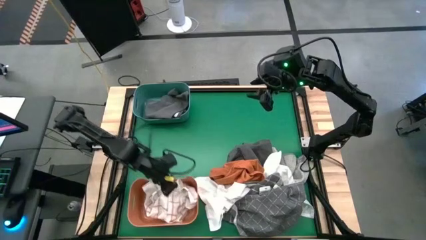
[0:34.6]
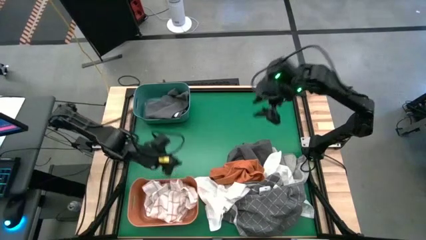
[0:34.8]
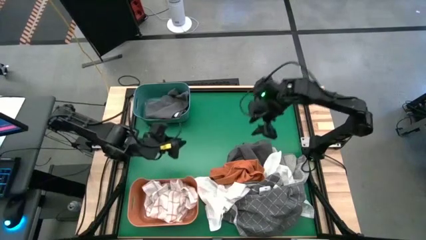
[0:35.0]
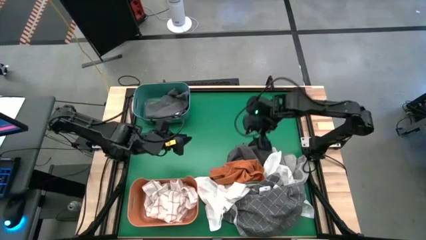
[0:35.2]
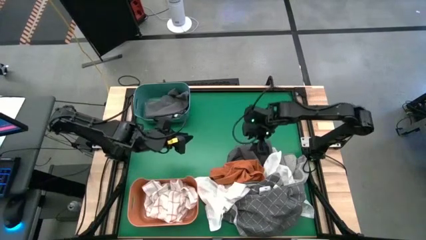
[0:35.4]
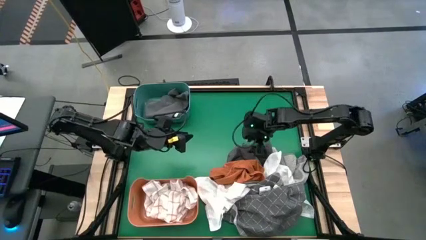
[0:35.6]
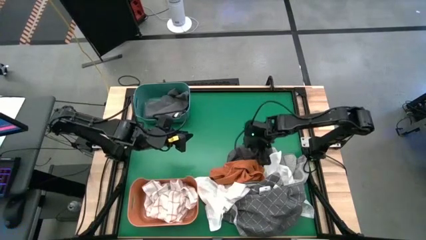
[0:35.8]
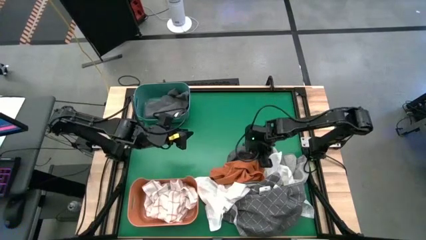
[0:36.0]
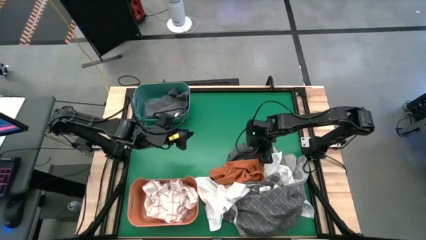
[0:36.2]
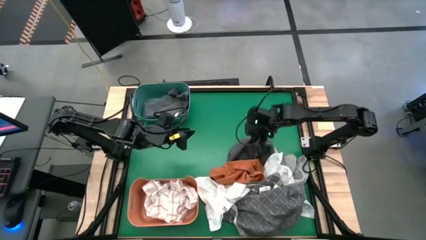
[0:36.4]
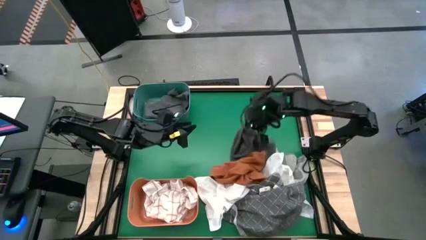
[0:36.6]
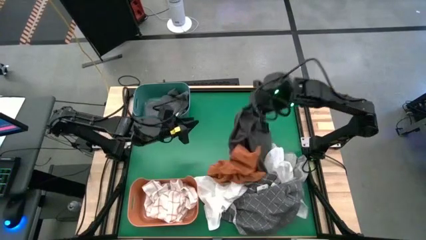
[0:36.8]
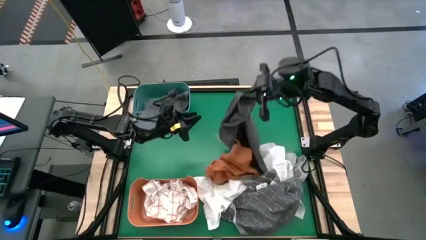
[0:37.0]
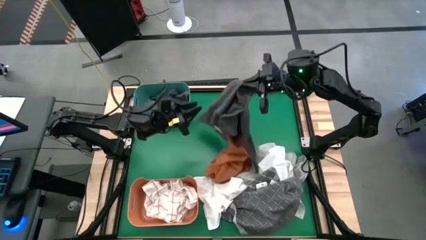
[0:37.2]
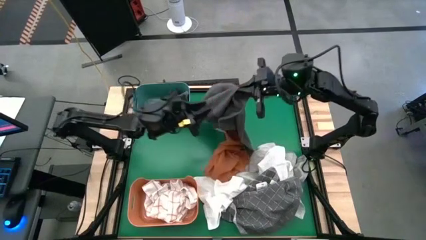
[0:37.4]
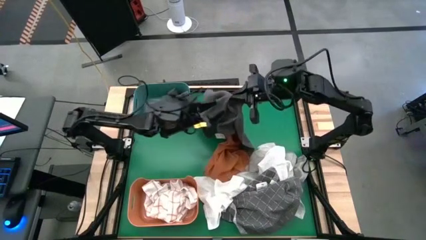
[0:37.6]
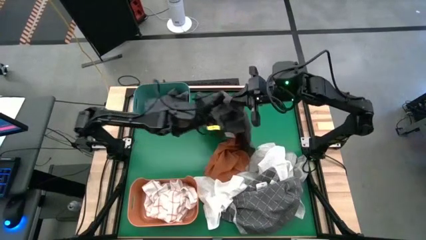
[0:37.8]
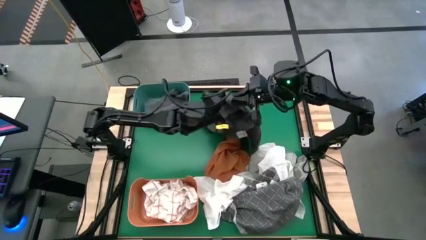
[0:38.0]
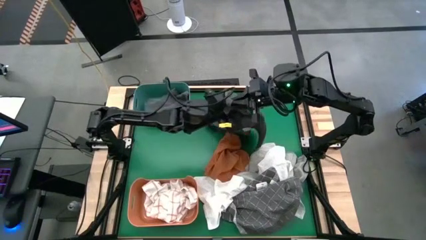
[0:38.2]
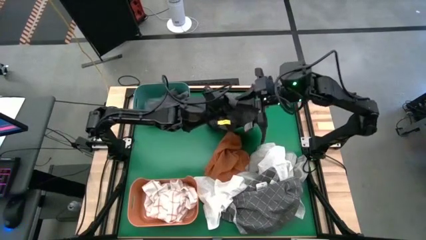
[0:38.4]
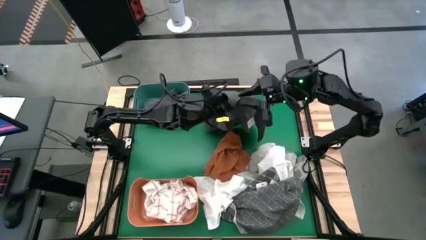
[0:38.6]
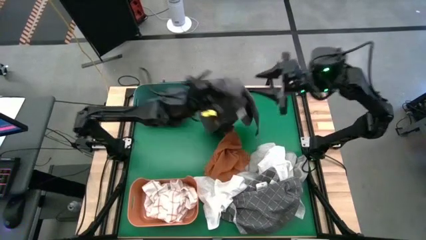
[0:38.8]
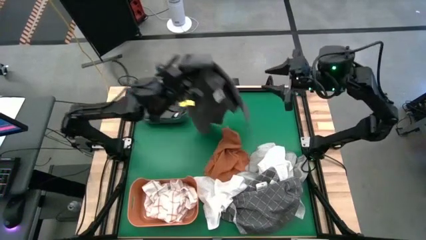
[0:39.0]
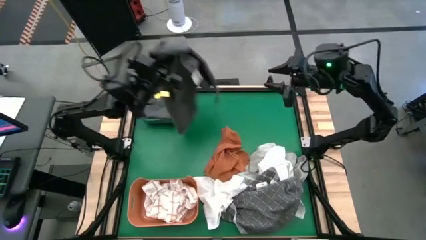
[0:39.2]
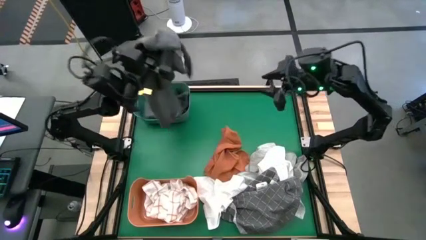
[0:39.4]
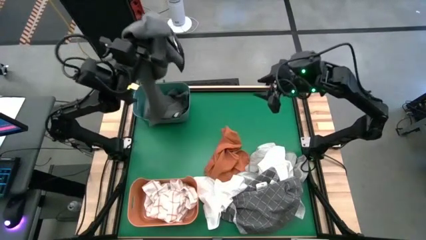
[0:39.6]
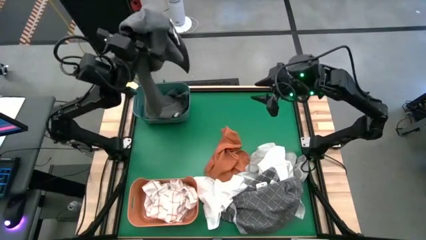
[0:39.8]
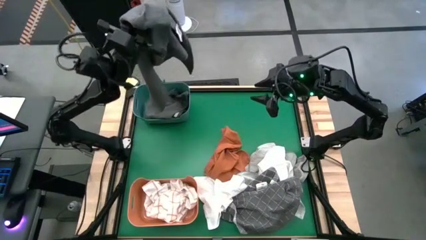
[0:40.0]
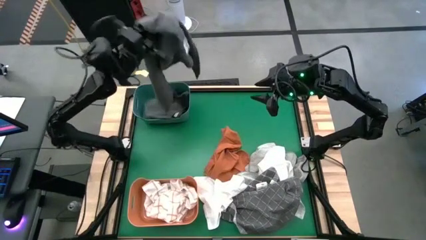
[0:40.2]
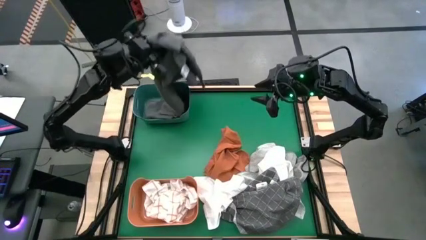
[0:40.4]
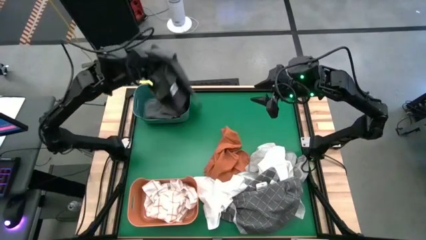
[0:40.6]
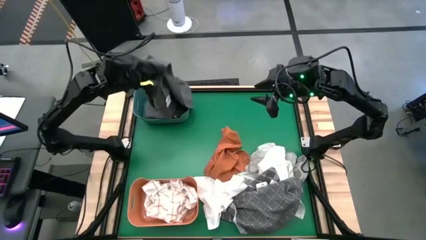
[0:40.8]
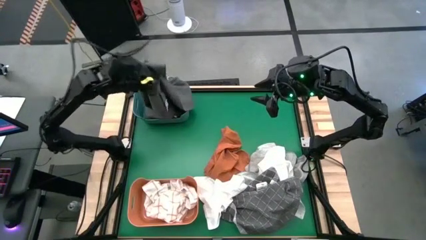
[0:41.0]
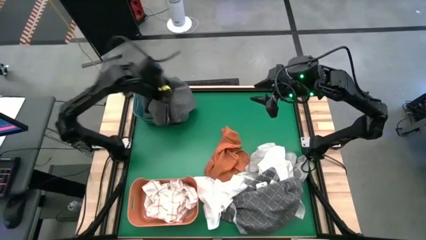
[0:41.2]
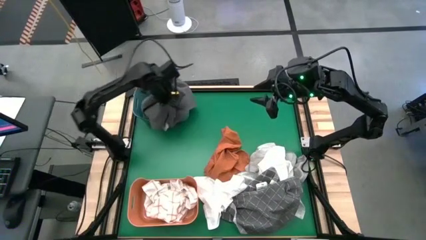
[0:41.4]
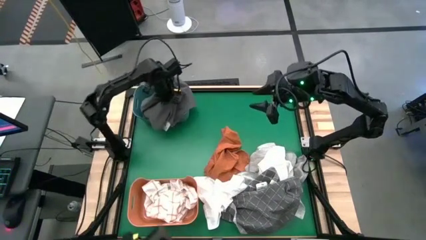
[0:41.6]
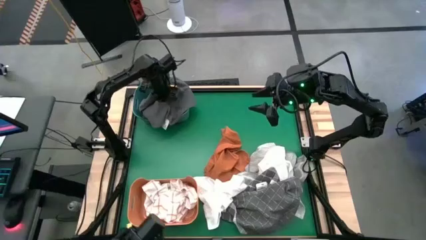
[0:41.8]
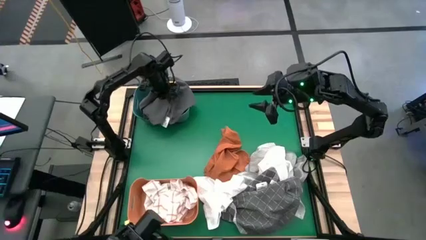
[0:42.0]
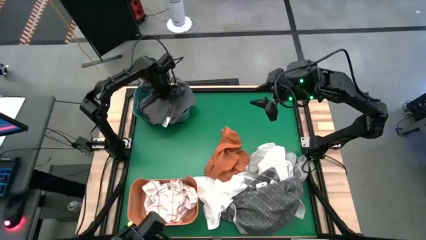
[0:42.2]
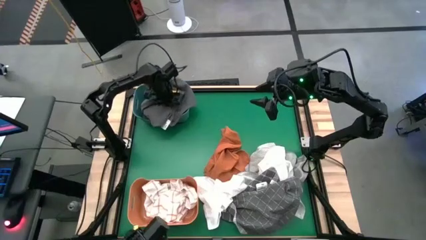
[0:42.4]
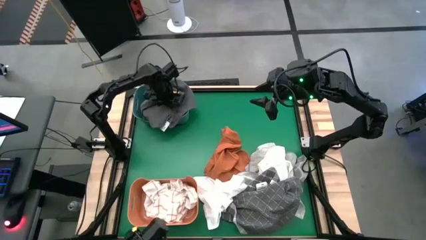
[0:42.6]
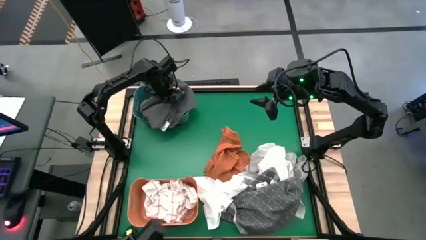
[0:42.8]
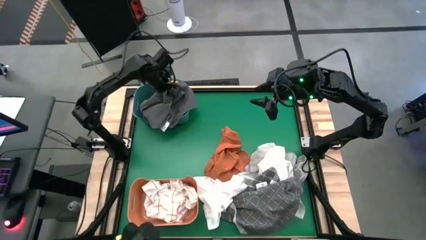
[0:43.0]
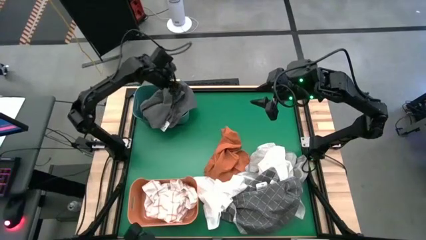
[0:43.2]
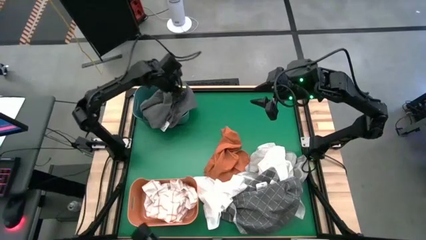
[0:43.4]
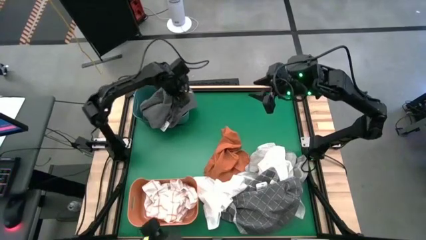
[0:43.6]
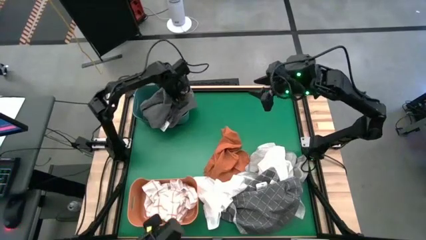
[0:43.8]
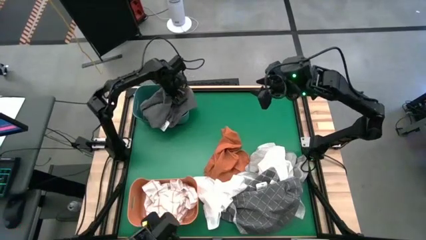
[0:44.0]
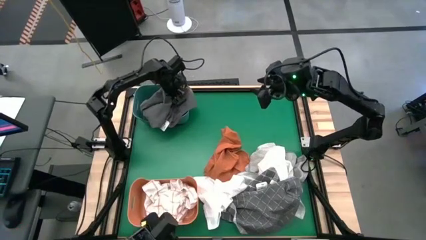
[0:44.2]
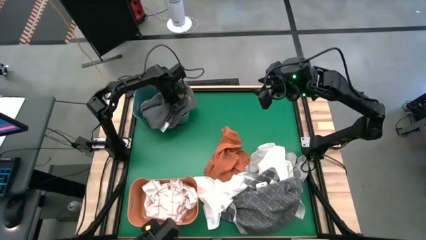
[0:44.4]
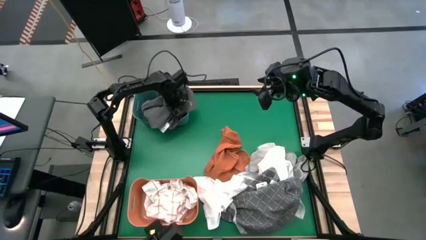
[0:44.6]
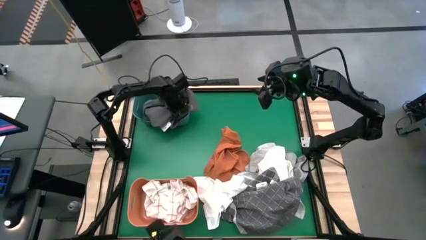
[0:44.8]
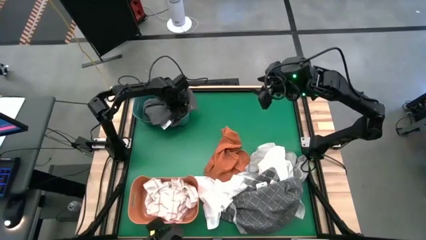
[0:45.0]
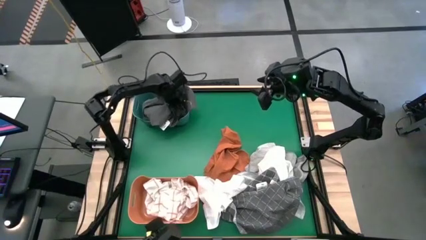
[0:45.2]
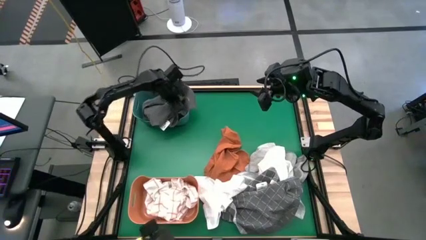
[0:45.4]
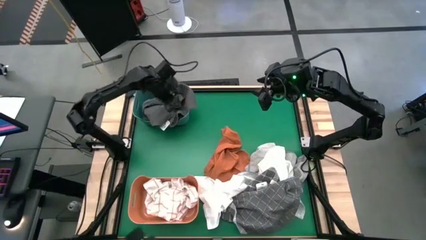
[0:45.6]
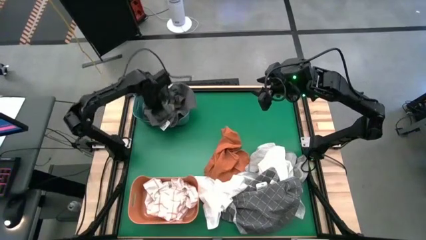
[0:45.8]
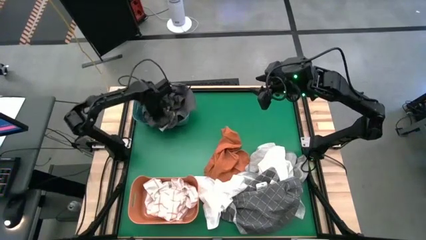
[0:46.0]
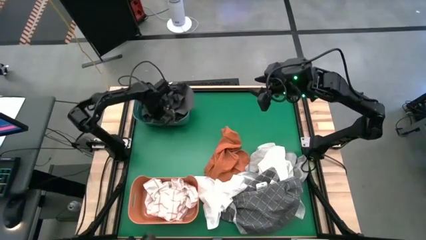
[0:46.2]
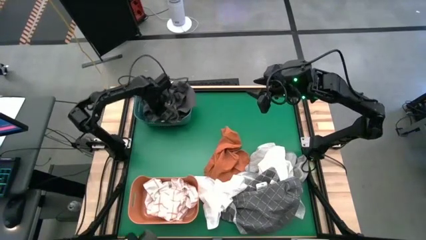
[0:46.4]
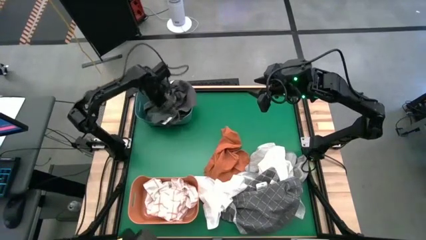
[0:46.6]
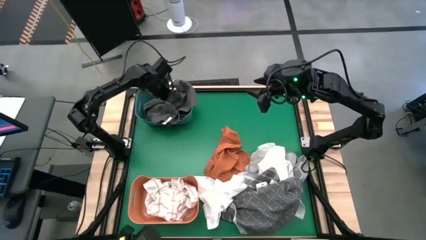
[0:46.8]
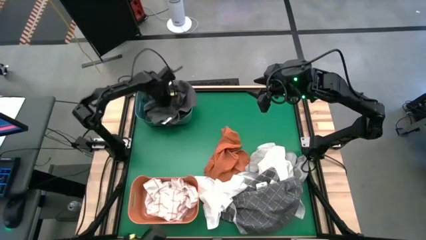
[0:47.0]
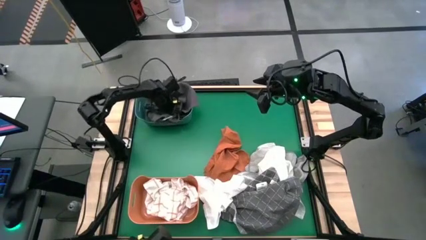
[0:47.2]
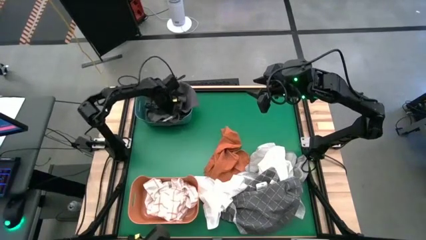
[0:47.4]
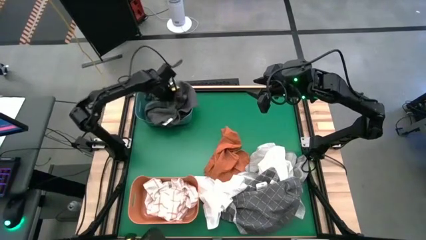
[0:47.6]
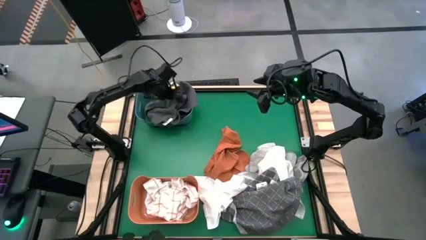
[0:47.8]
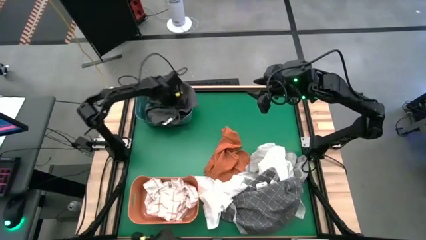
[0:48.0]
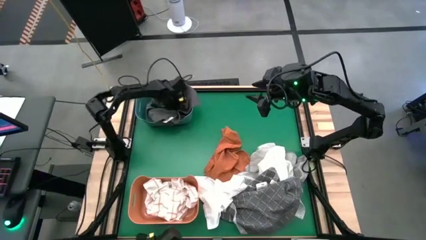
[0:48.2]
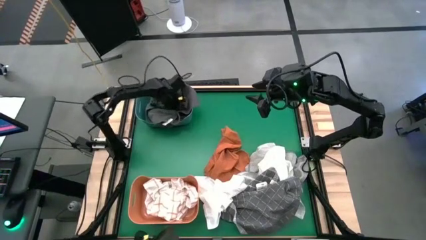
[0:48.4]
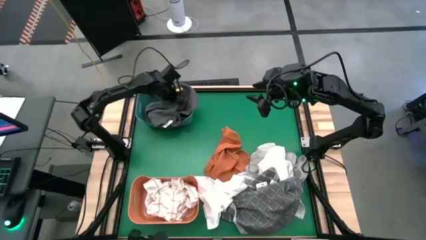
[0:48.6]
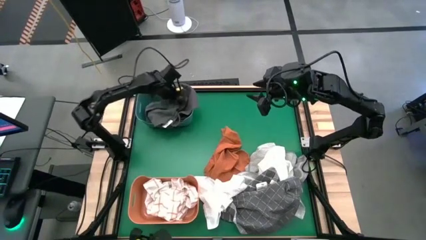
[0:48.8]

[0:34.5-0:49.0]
Task: Sort microfiber towel by color & place in baskets
Put the black microfiber towel into the green bin
